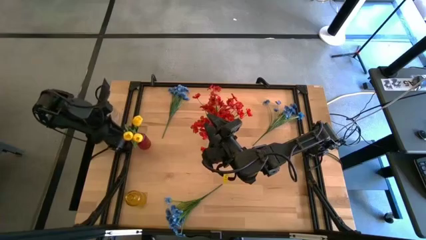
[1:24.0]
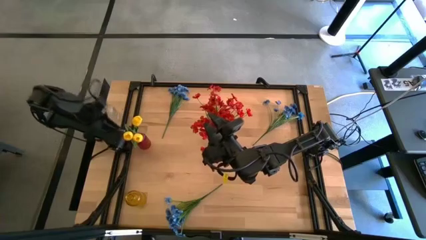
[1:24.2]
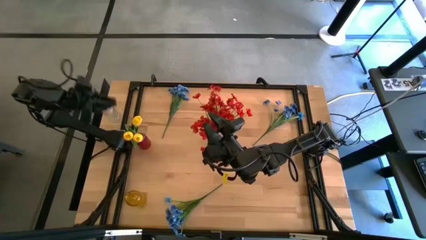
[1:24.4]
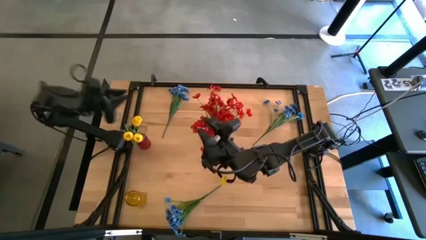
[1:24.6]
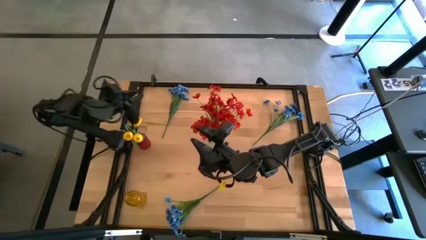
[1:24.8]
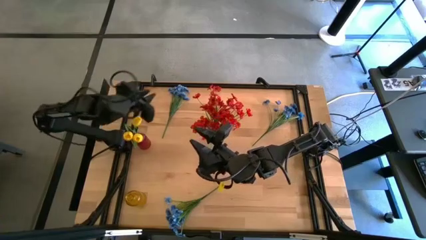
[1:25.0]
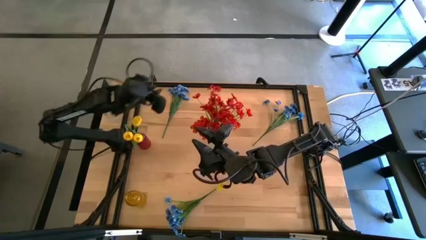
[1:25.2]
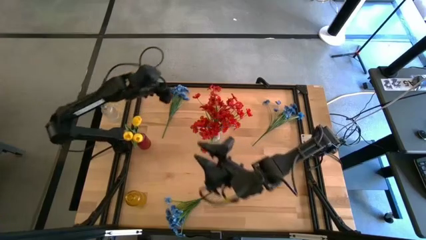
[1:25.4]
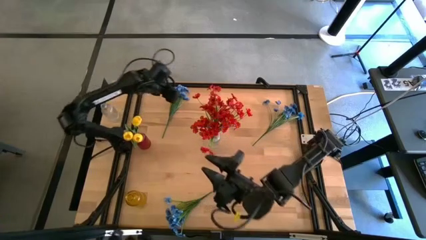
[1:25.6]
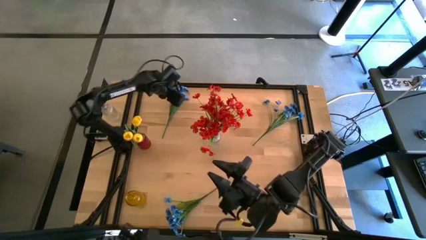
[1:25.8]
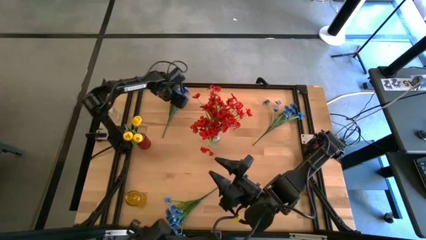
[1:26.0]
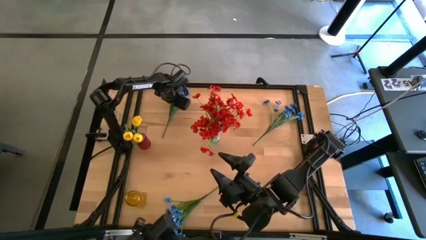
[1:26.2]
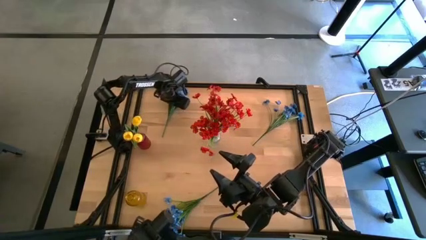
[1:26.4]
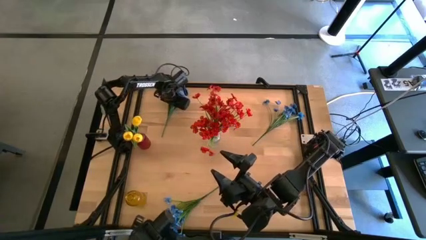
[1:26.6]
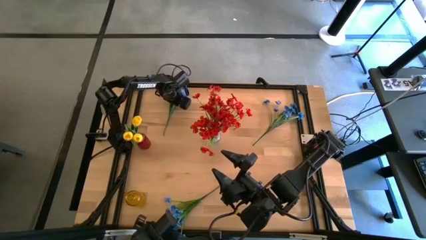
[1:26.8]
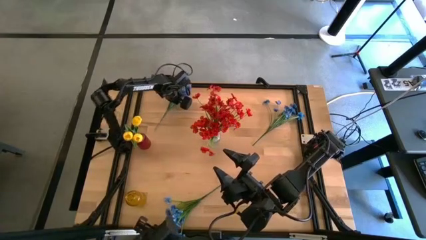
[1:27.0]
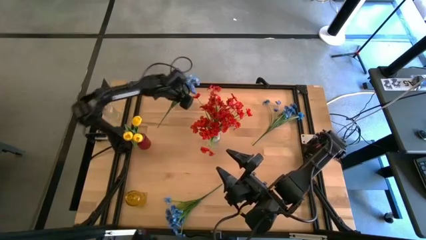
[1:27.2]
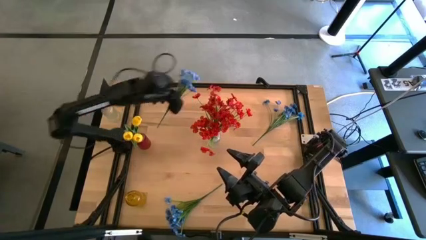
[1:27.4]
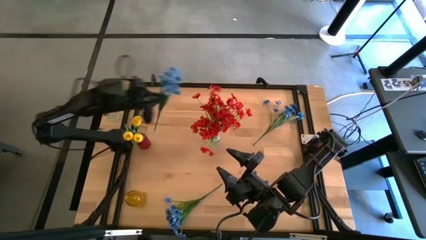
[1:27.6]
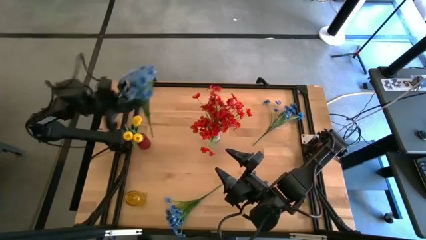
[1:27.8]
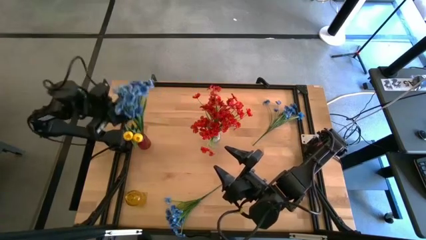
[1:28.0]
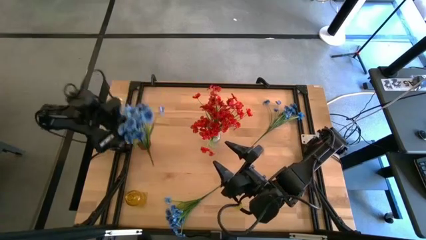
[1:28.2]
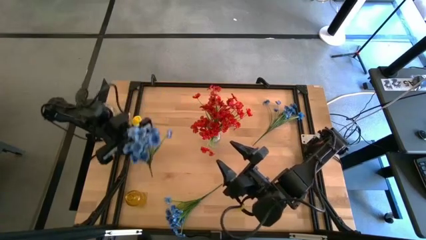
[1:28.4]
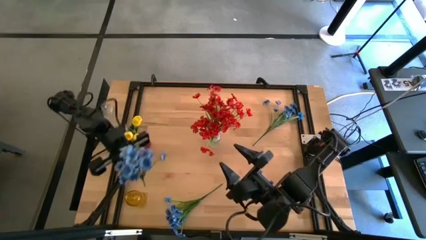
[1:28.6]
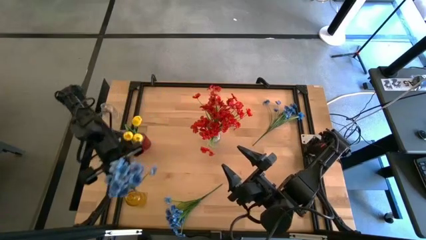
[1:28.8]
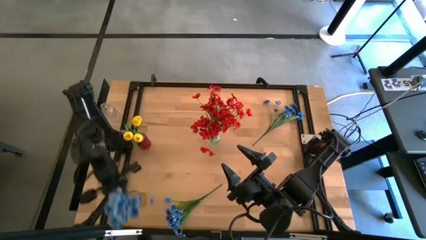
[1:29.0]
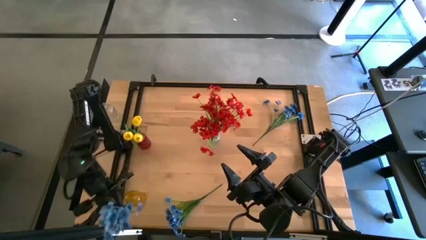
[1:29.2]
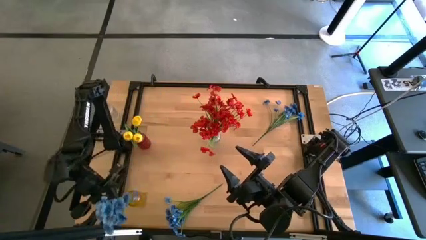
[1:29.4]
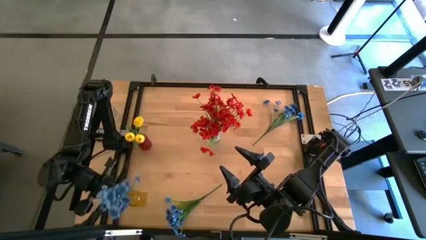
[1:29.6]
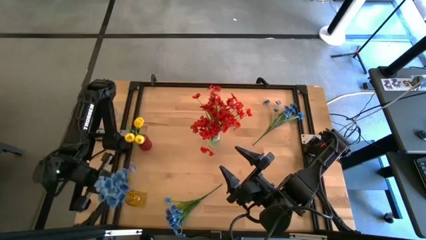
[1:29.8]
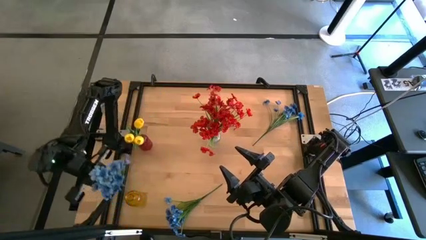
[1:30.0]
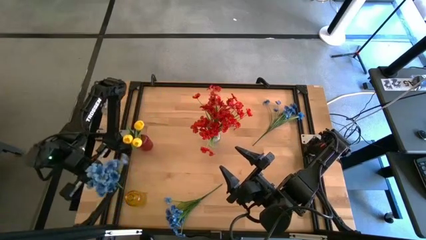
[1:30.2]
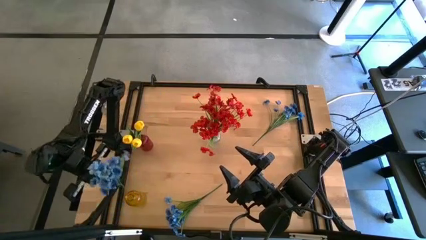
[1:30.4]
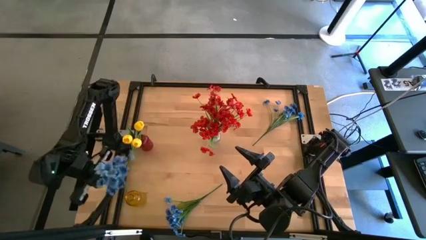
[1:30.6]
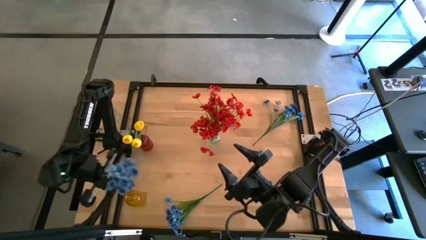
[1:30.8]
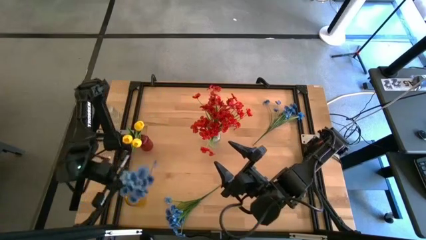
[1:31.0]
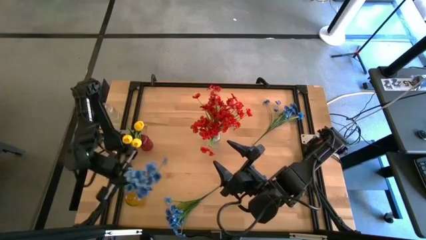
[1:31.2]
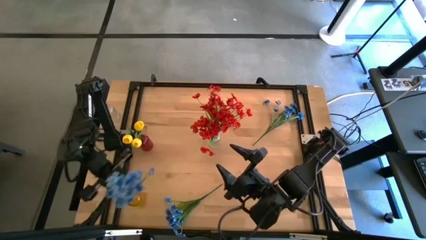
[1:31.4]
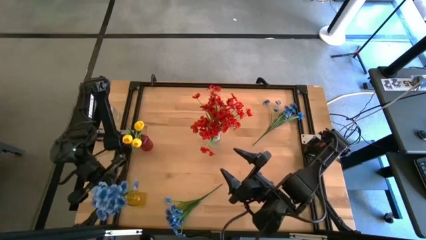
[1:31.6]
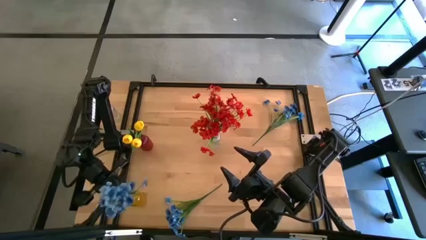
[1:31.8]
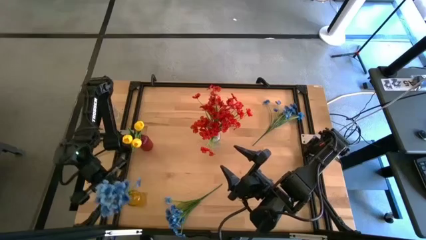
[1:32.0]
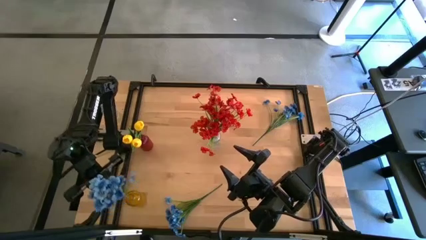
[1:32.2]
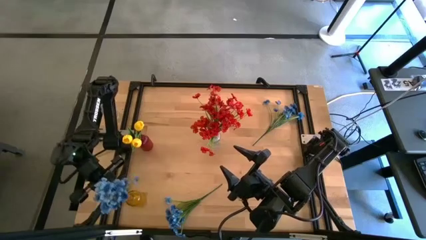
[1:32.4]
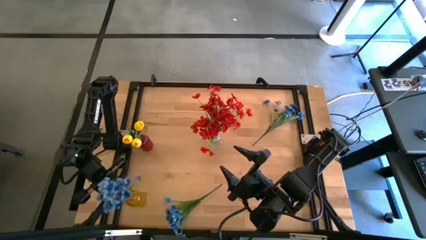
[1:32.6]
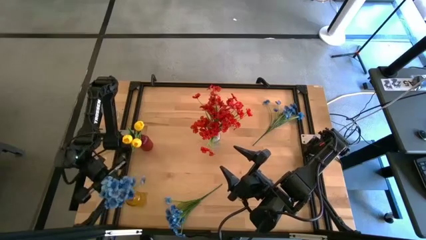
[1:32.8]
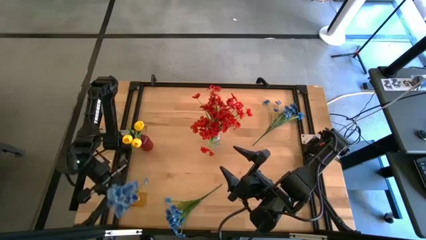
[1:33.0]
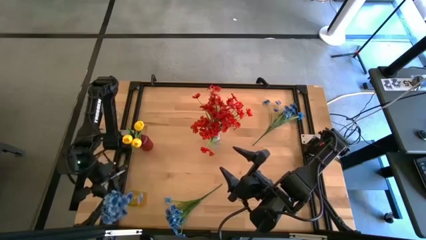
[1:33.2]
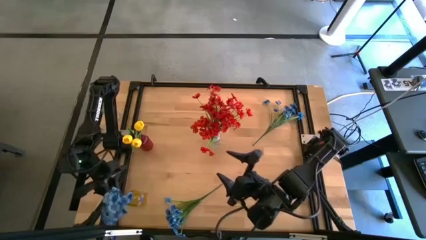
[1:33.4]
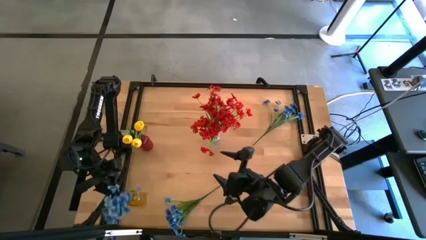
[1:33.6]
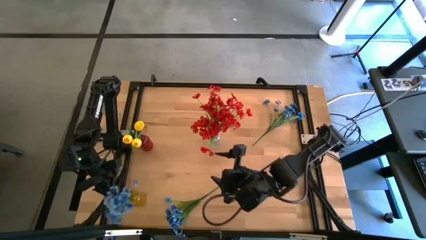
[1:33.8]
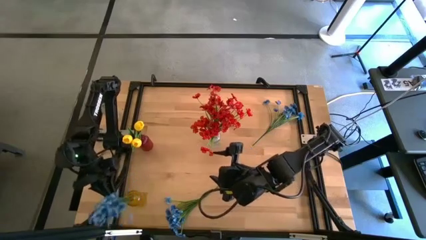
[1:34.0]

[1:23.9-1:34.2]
Task: Sort flowers into vase by color
Put the top left blue flower into the yellow vase
